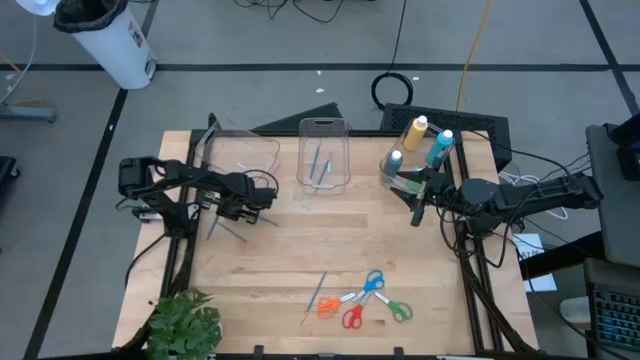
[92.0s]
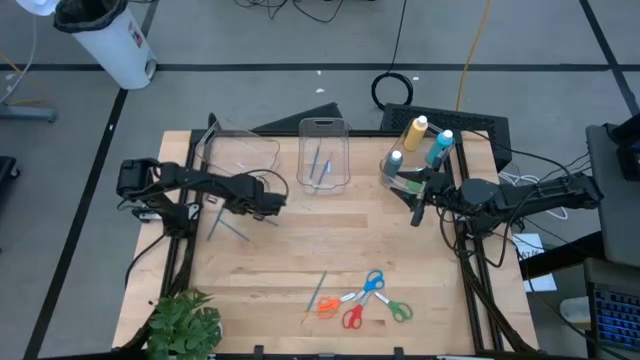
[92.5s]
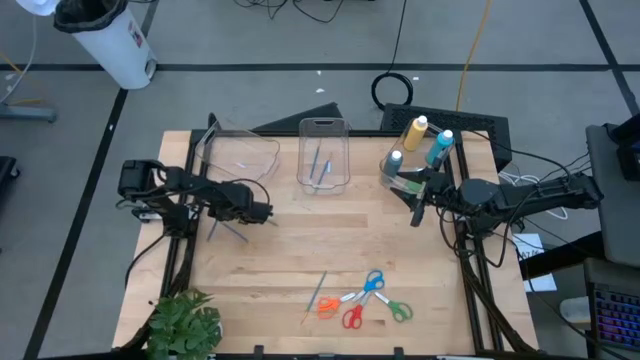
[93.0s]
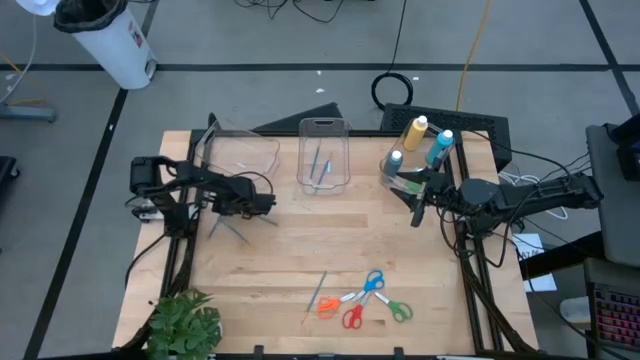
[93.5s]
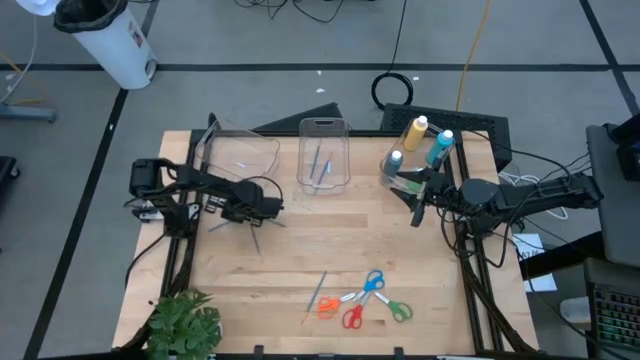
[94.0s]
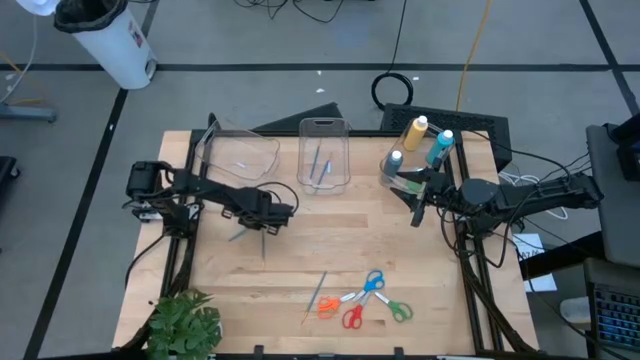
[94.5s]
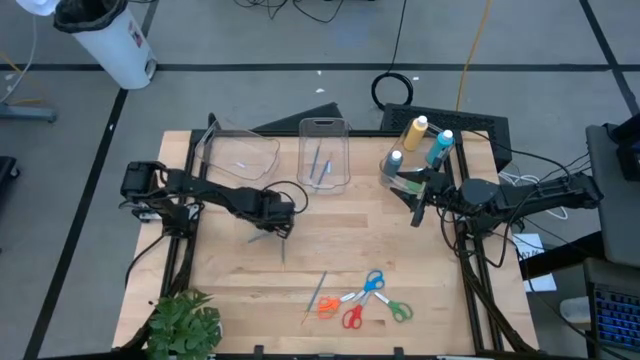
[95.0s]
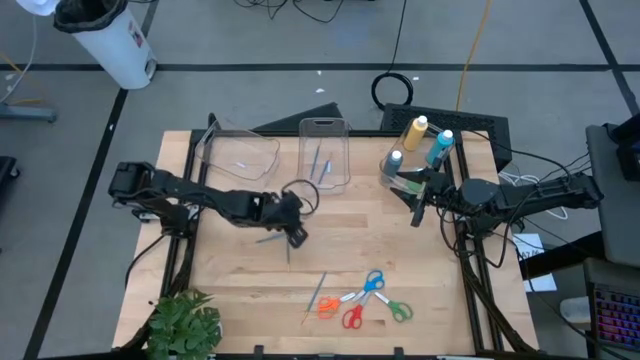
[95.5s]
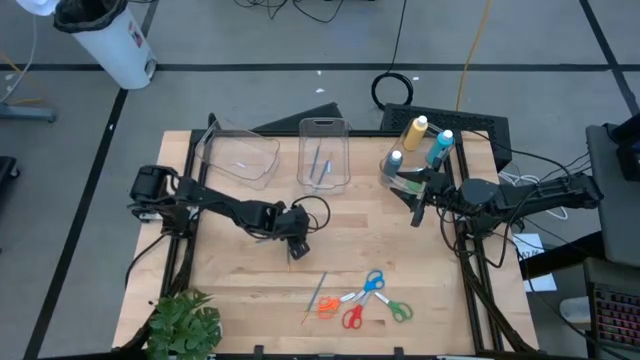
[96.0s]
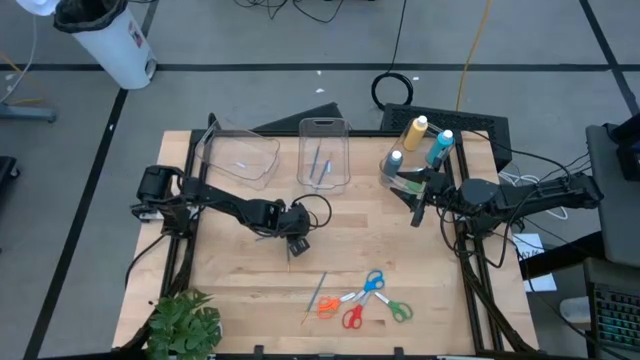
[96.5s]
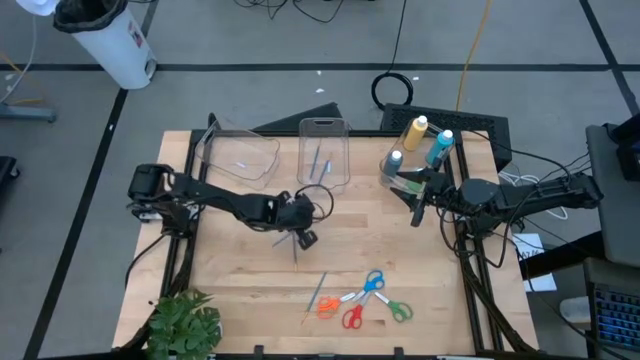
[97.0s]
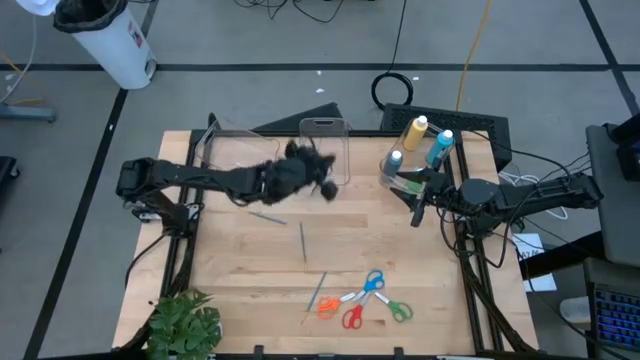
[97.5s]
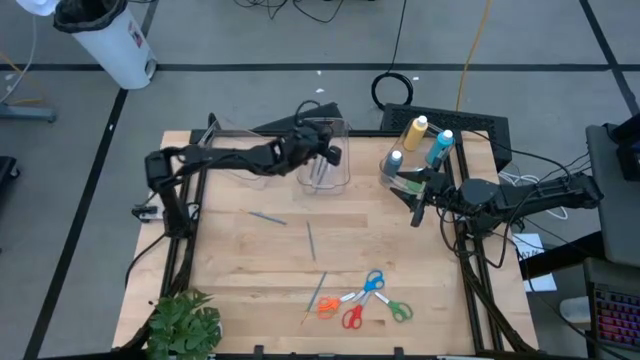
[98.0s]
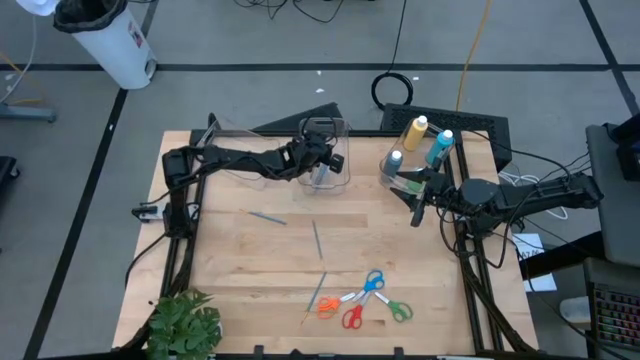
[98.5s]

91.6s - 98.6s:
Task: Pick & Place Paint Supplies
Put the blue paint brush into the middle transparent bin

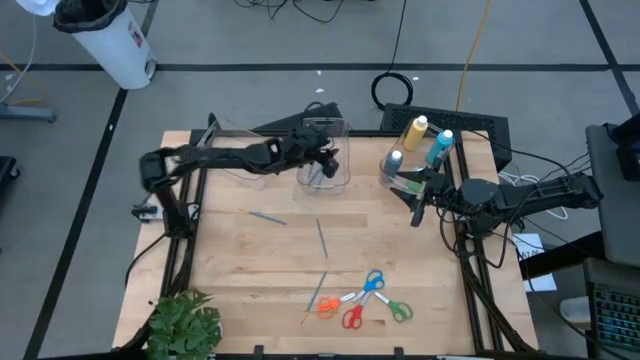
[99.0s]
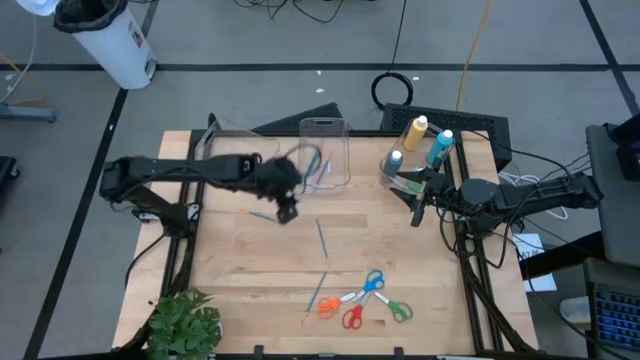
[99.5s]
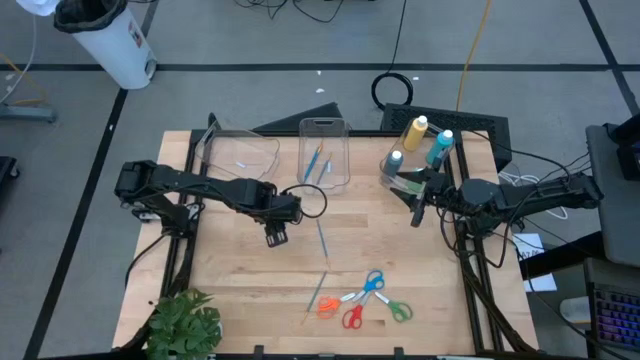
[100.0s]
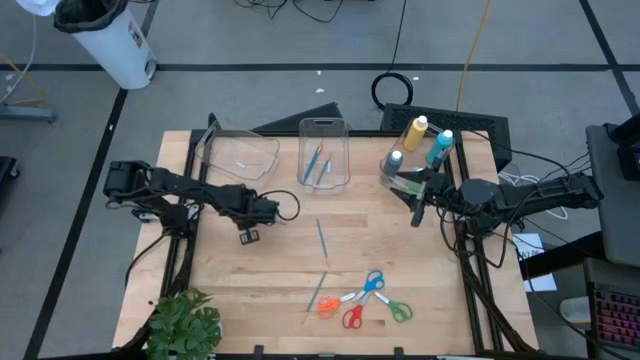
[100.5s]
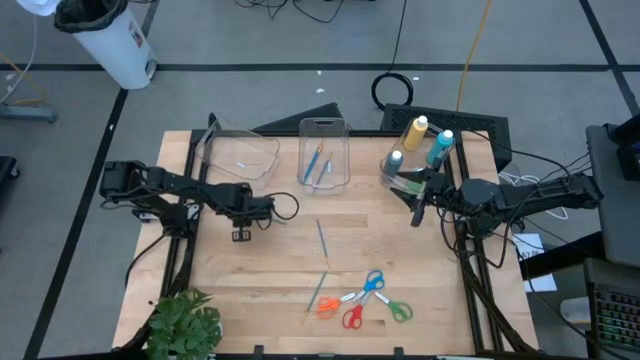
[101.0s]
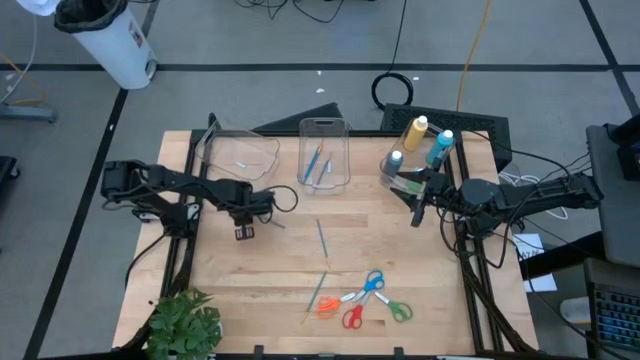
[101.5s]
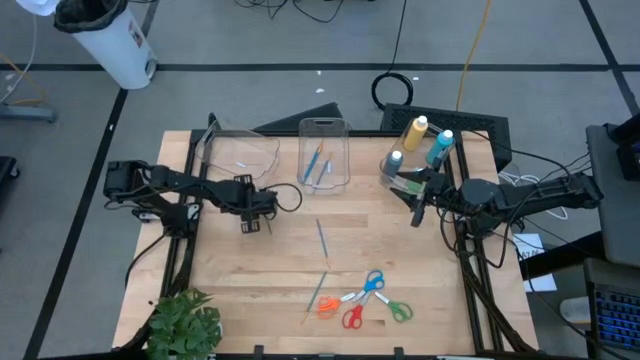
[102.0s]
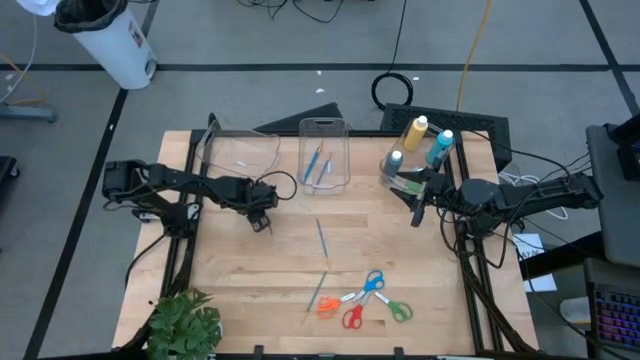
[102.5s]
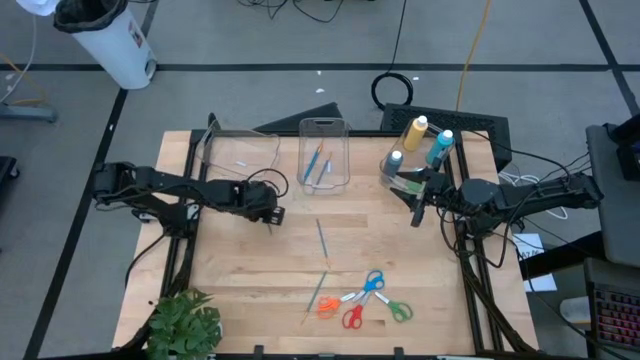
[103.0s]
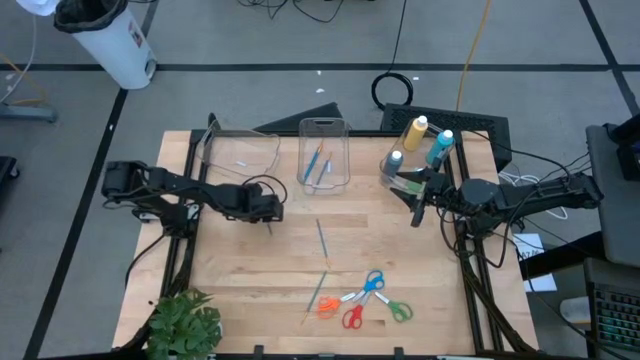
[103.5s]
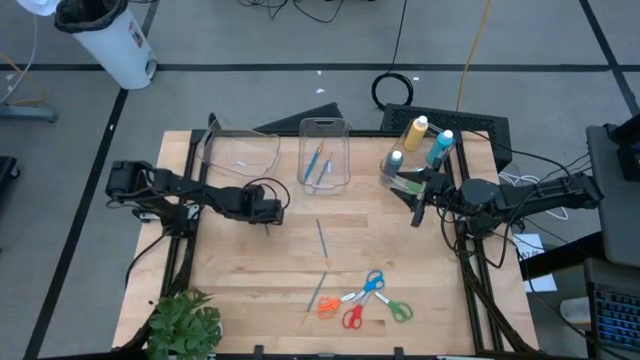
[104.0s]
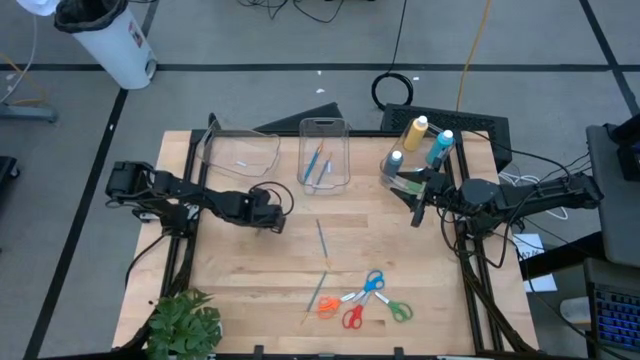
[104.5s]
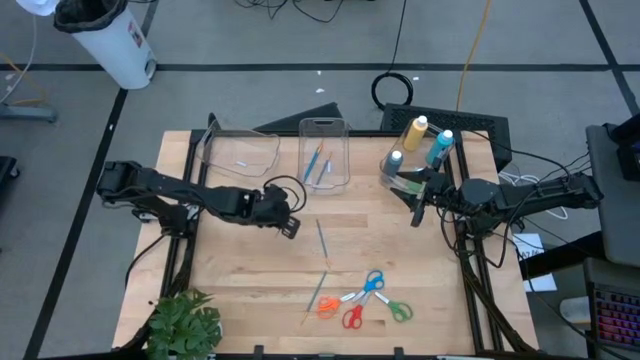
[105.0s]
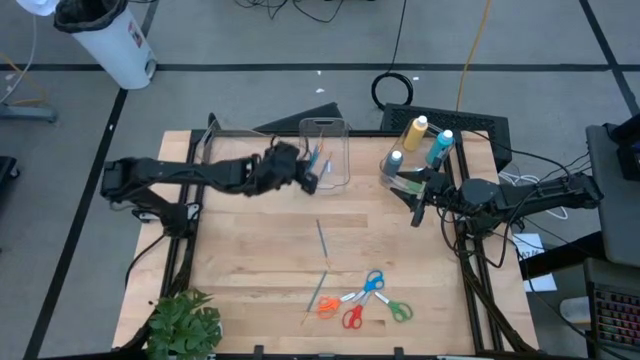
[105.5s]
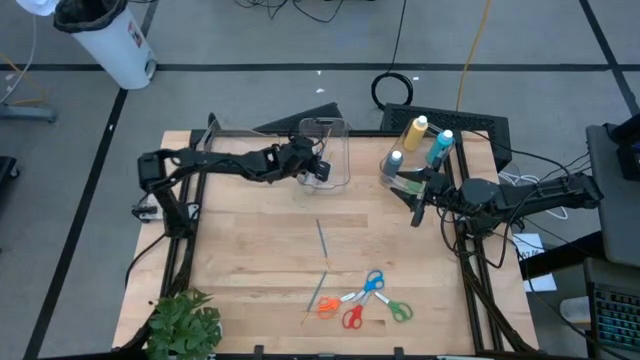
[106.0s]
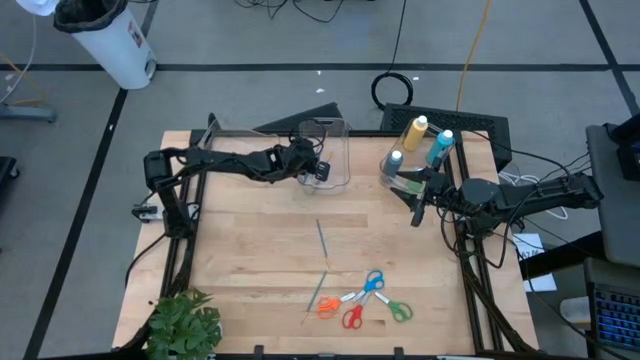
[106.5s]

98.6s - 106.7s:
Put the blue paint brush into the middle transparent bin

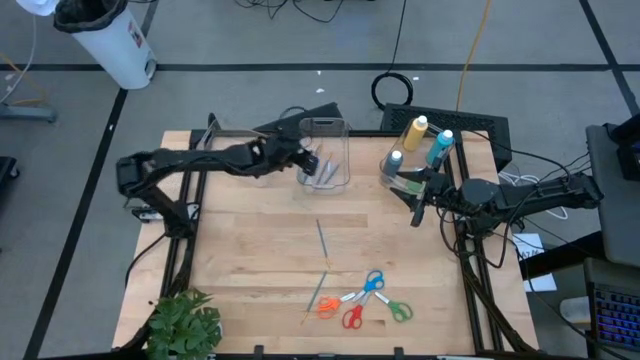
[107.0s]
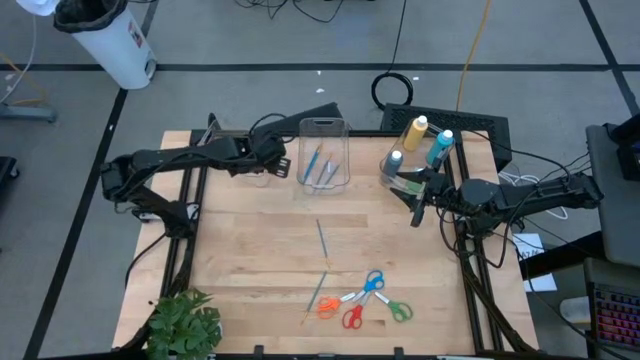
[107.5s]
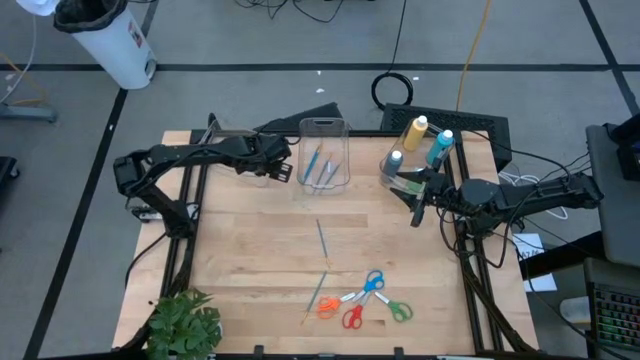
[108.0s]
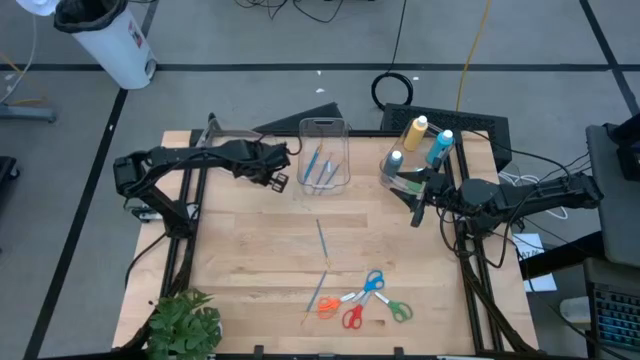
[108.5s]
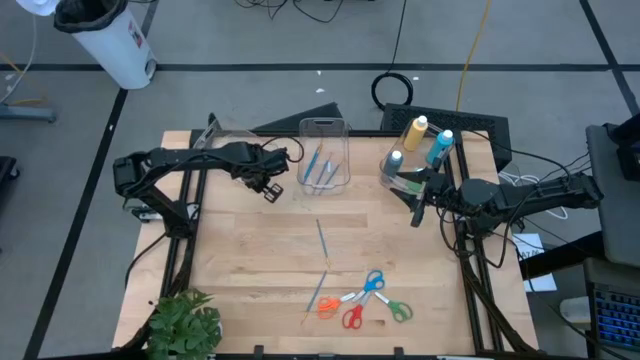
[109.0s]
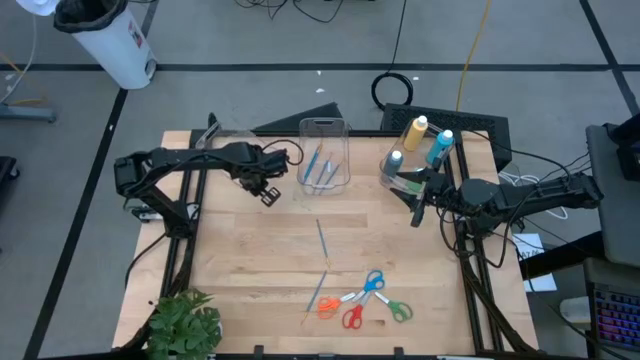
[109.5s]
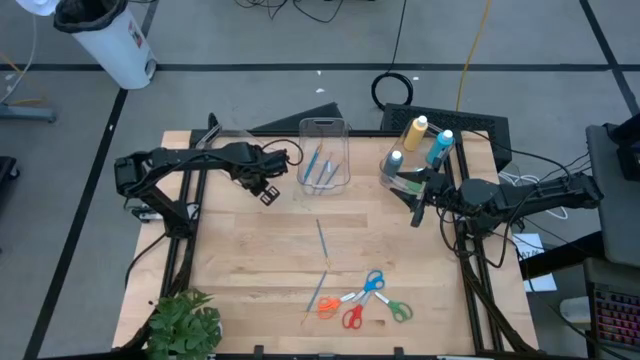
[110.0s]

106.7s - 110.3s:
Adjust the left transparent bin on the table

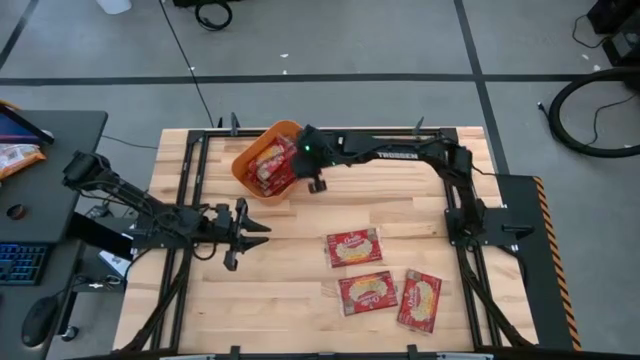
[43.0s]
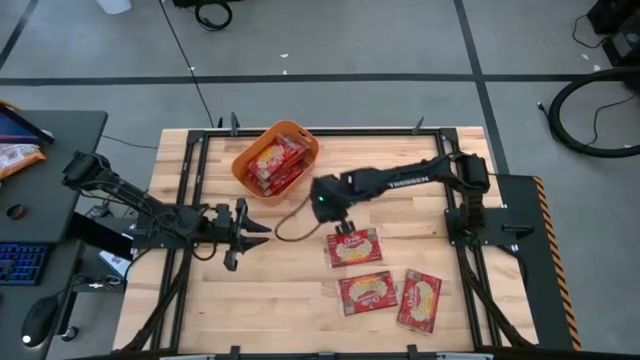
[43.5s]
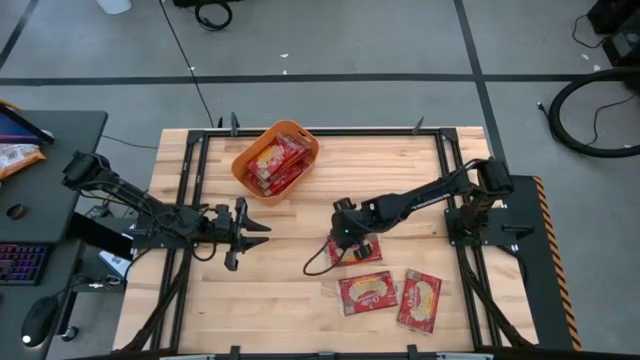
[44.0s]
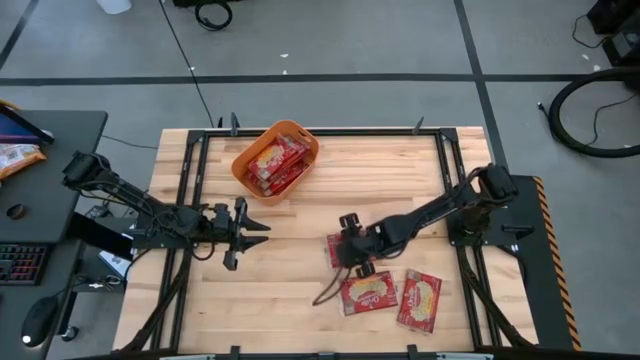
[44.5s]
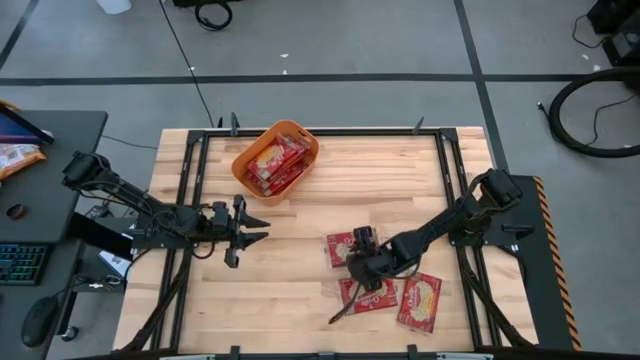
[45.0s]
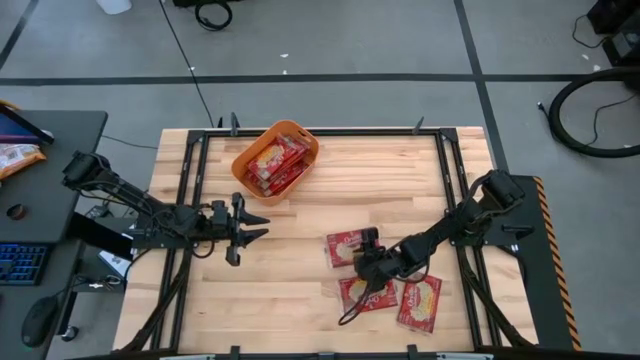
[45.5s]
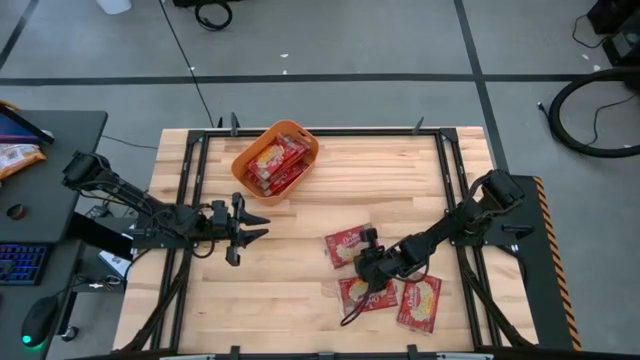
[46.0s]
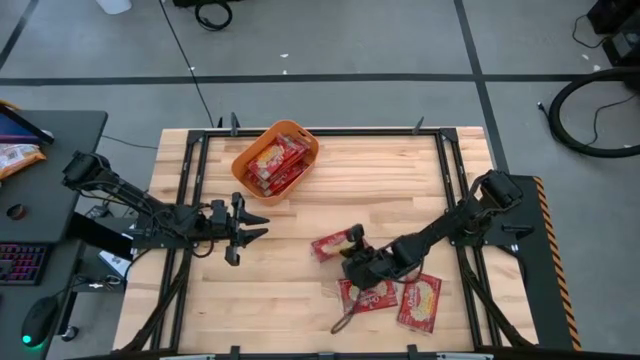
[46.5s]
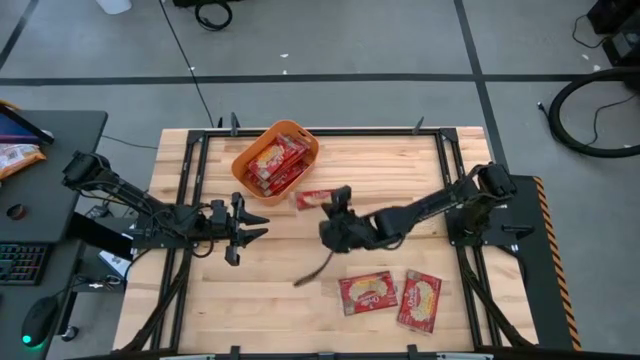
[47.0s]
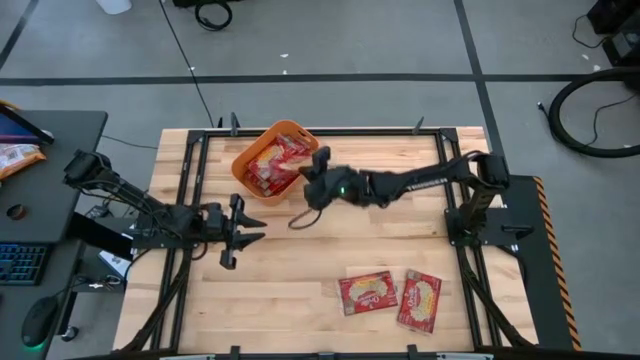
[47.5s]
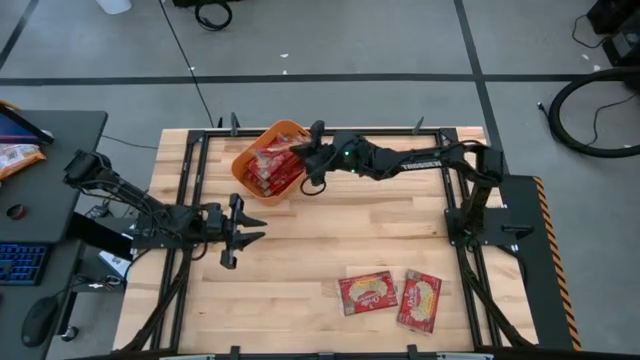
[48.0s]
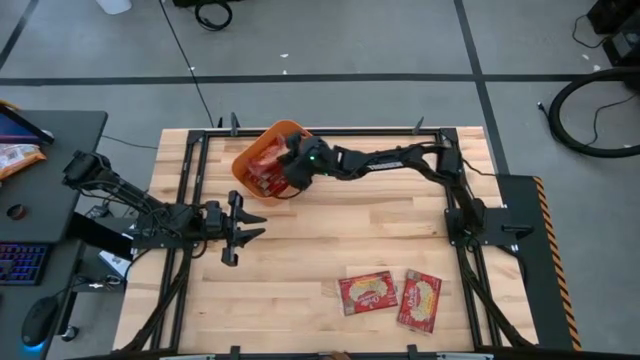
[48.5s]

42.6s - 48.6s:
Task: Sort popcorn bags into baskets
Put the red popcorn bag into the orange bin
